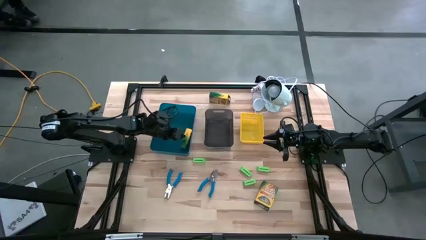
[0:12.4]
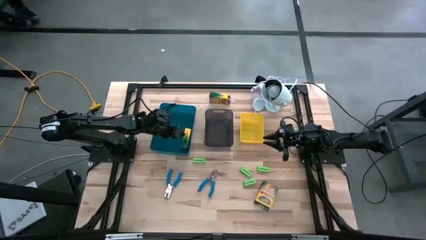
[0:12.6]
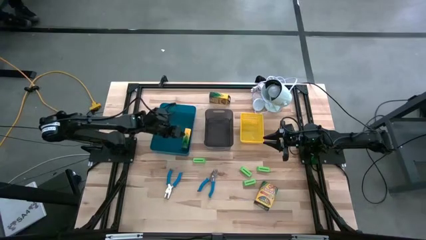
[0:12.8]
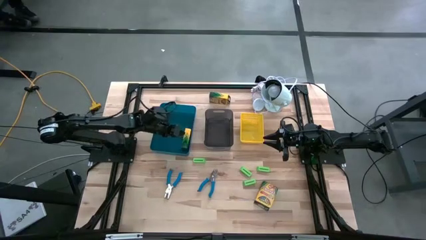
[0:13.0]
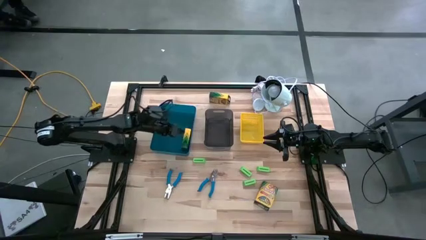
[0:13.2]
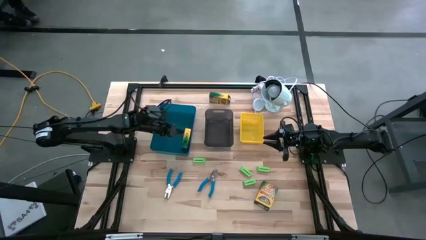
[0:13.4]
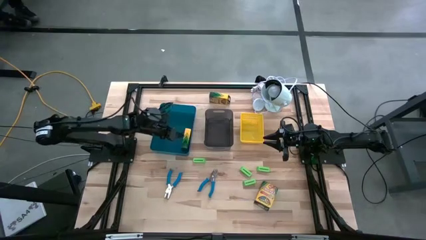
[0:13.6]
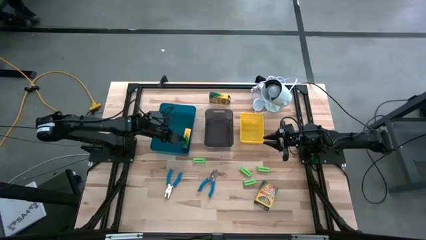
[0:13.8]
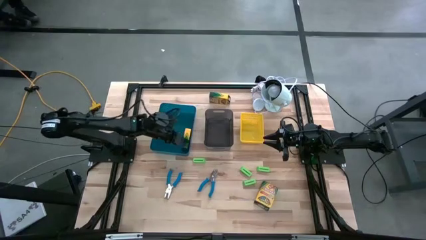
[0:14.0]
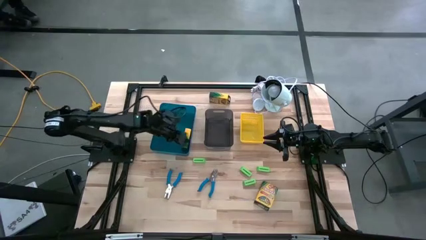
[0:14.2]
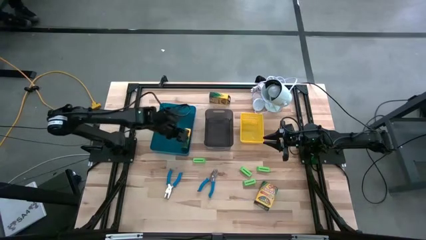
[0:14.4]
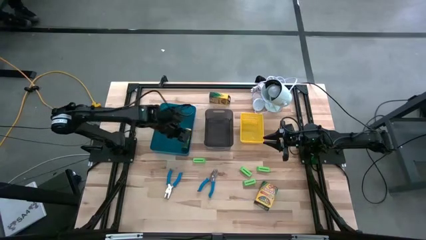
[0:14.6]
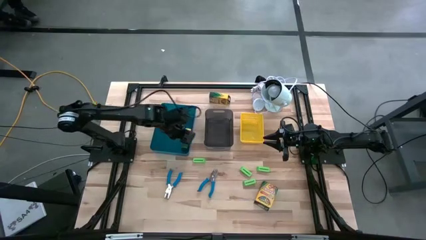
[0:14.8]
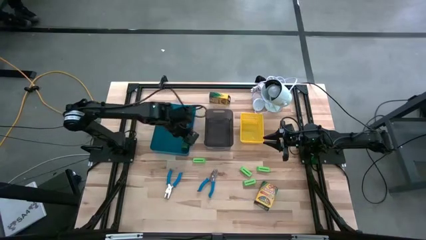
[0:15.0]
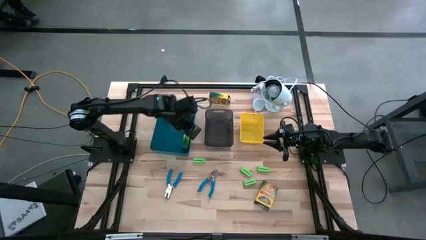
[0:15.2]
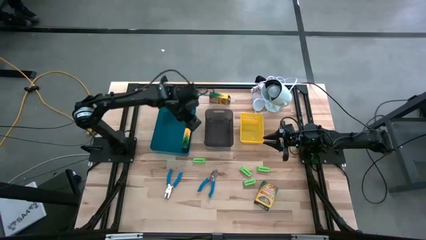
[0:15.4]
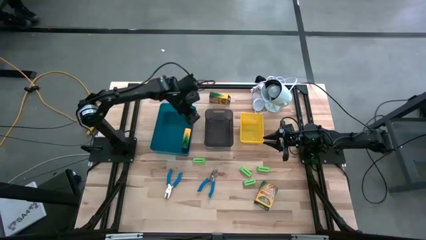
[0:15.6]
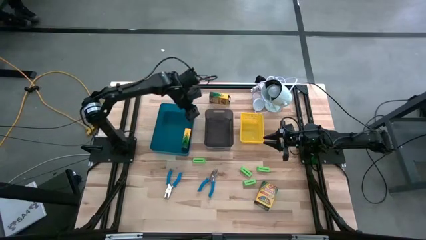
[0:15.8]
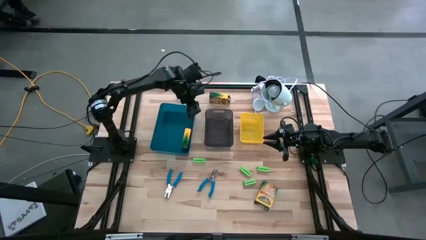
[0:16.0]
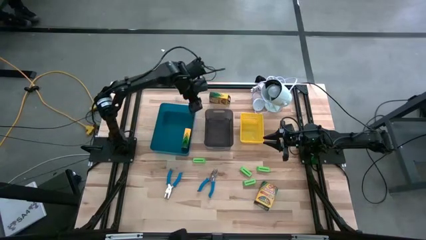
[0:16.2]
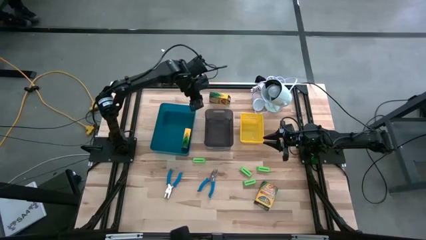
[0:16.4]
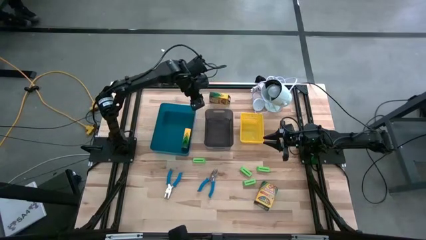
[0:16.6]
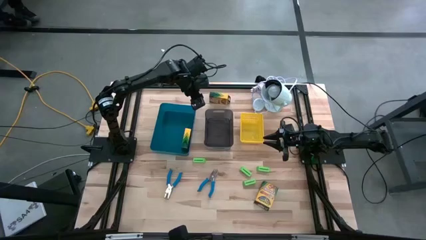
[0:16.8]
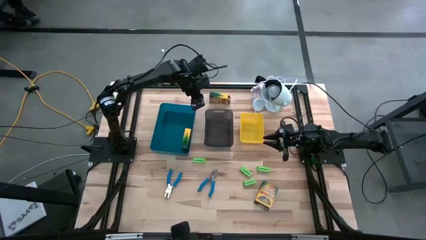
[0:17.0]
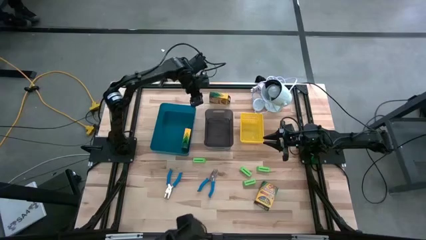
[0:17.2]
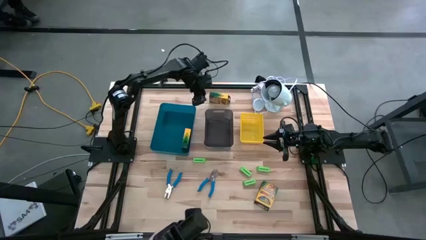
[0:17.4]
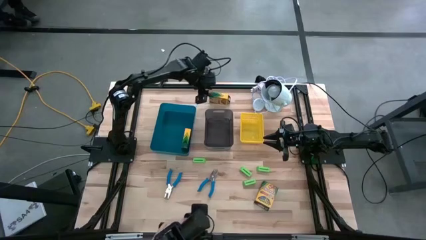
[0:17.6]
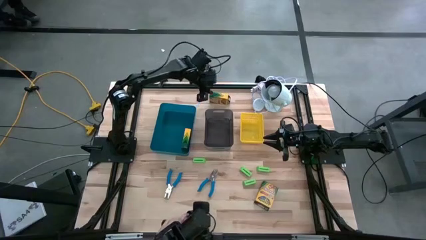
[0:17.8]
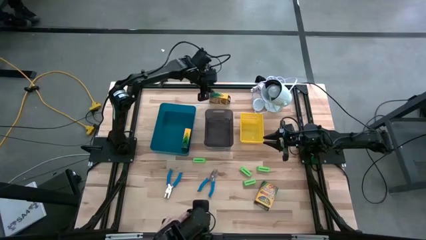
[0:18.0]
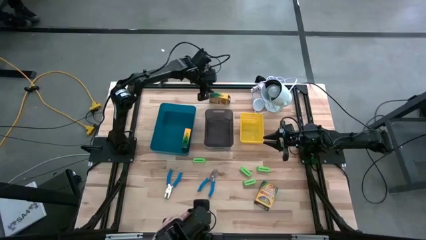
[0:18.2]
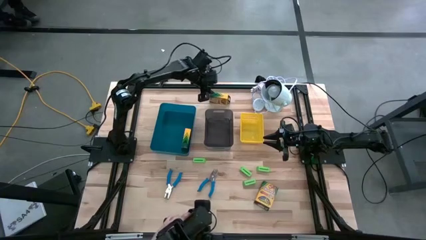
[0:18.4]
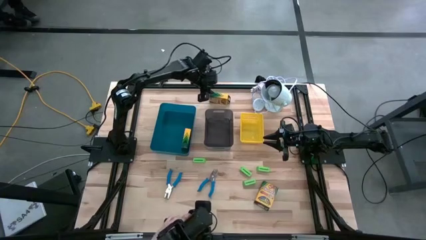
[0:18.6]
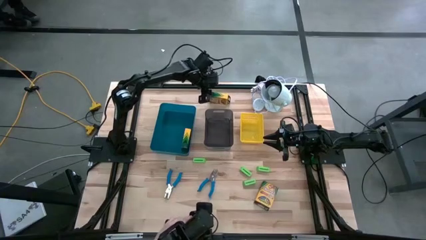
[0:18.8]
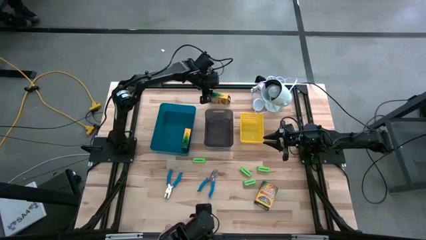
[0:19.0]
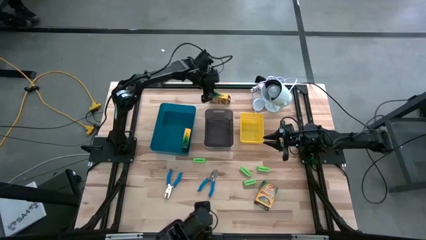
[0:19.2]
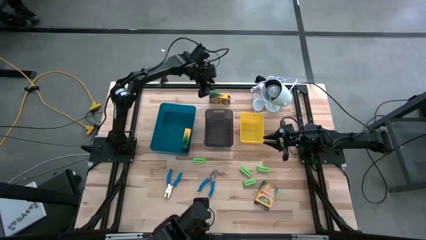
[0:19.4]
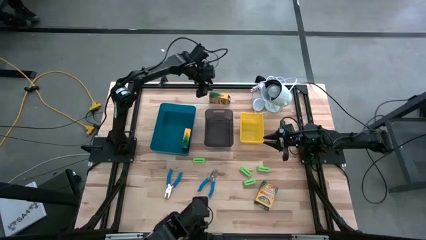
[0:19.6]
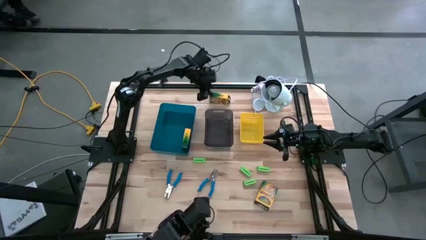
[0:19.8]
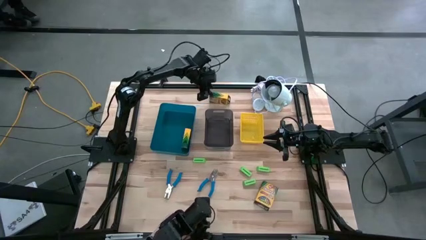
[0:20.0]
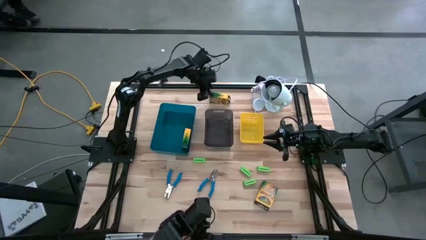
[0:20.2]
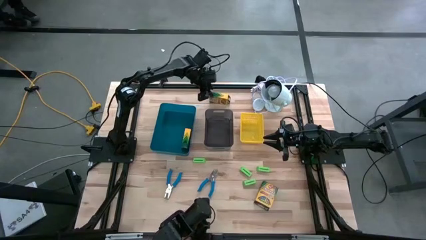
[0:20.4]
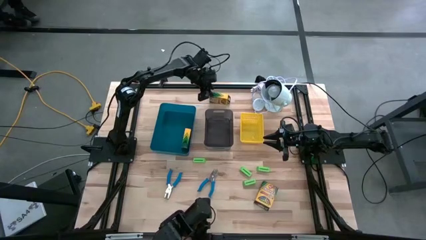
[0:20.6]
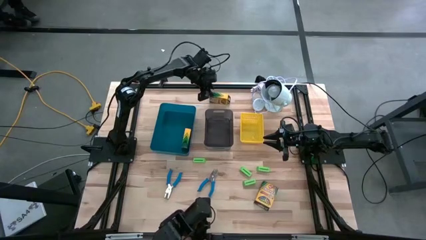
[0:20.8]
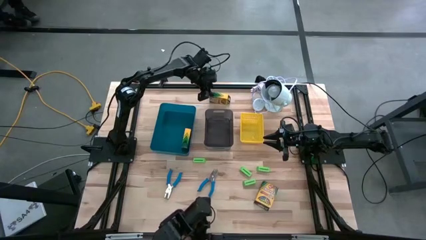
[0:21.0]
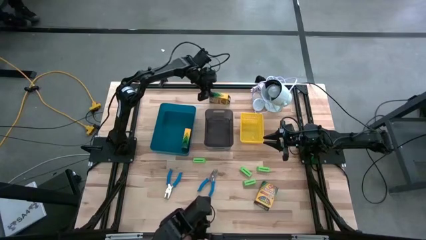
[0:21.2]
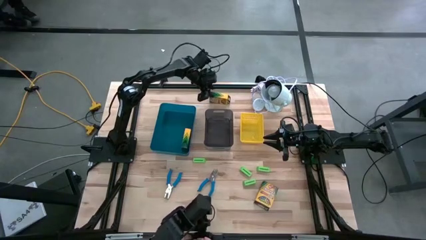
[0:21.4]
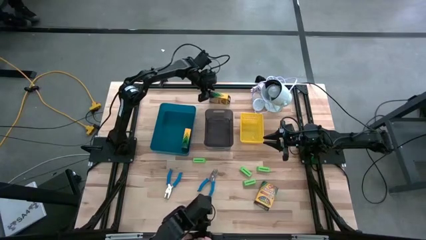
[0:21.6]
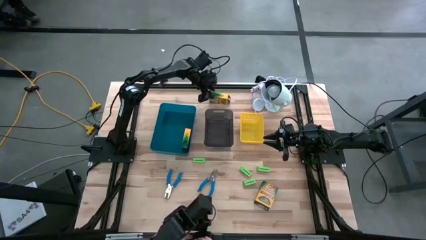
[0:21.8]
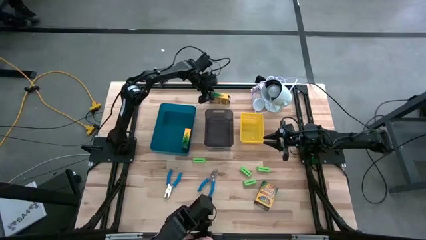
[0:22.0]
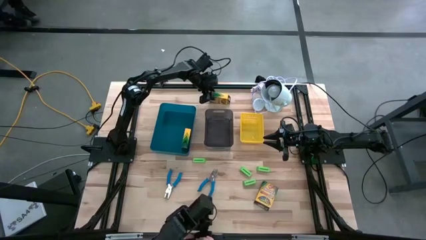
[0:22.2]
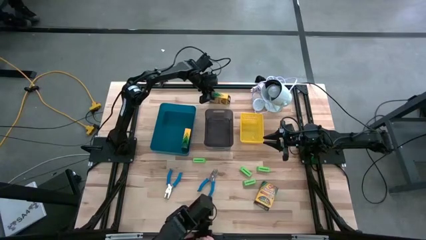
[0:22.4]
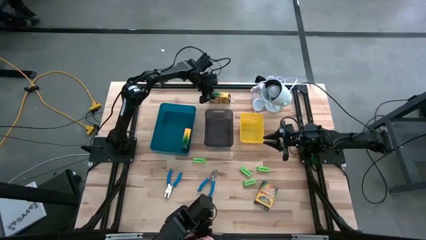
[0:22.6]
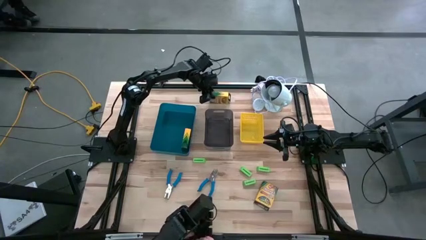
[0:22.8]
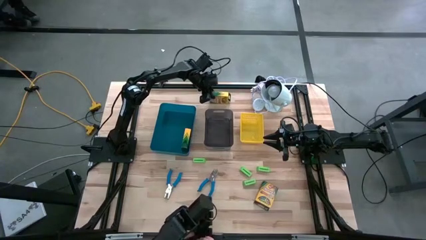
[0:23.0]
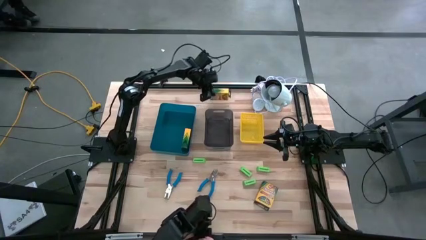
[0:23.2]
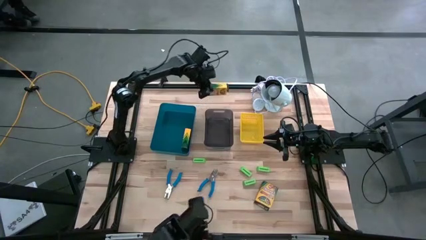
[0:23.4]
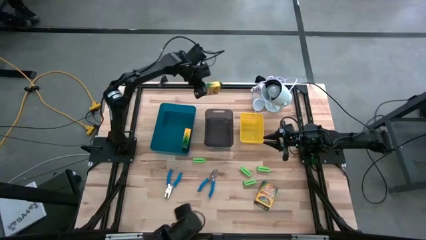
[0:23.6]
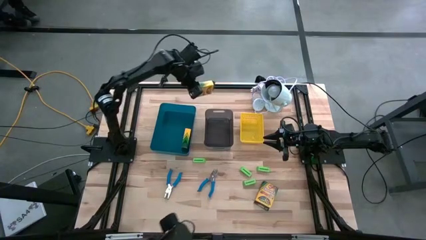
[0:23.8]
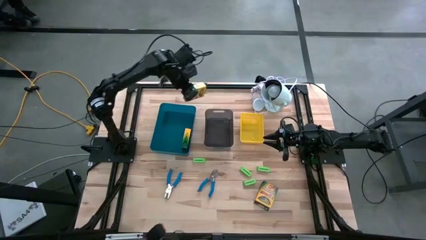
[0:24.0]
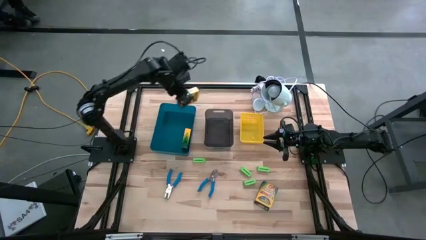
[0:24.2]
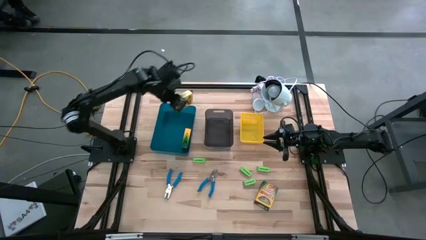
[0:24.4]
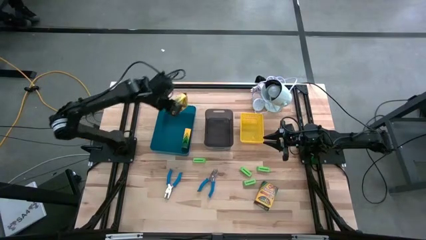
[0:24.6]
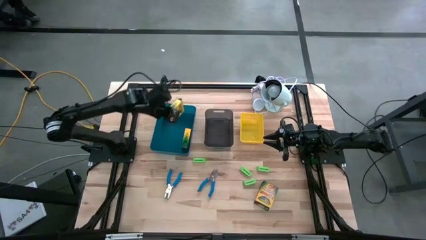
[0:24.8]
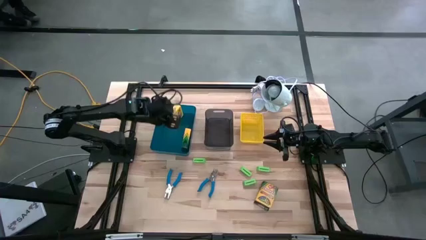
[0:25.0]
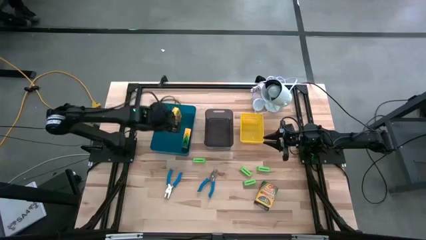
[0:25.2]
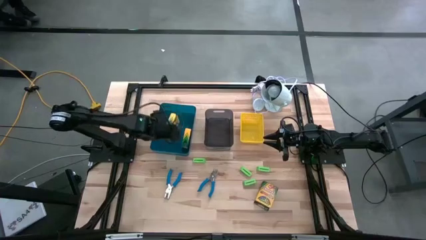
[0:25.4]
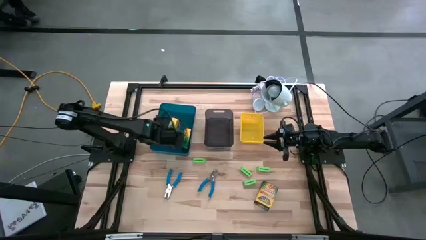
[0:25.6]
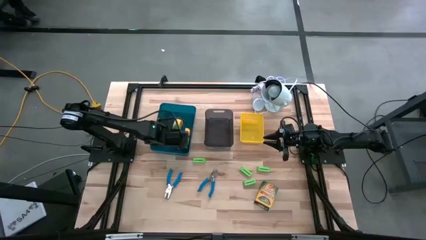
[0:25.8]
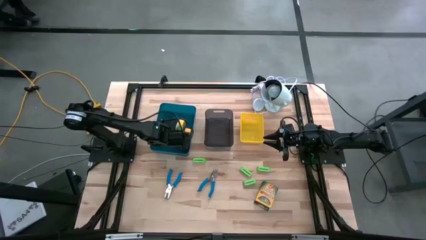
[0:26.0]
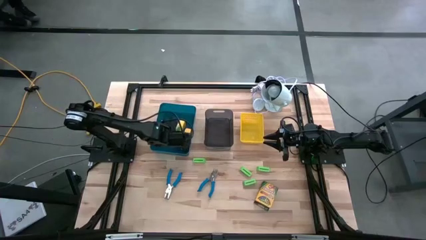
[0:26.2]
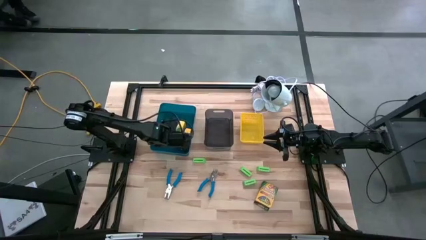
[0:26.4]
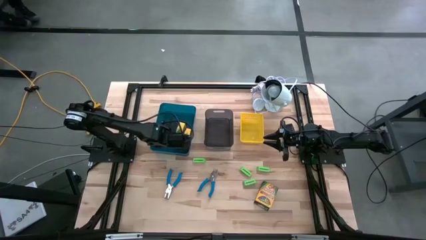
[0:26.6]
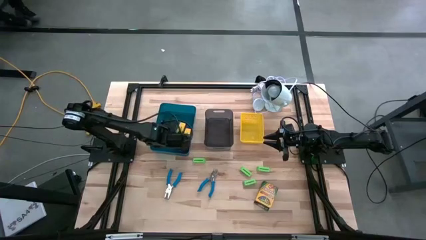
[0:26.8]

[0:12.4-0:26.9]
Task: Pick & Place School Supplies
Put the crayon box into the blue bin
